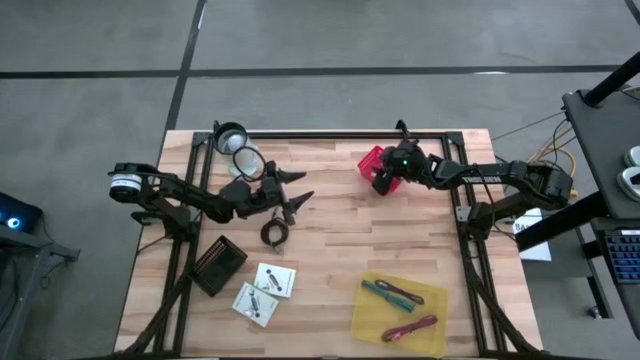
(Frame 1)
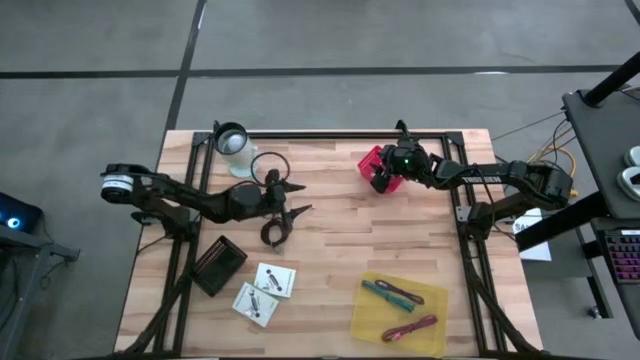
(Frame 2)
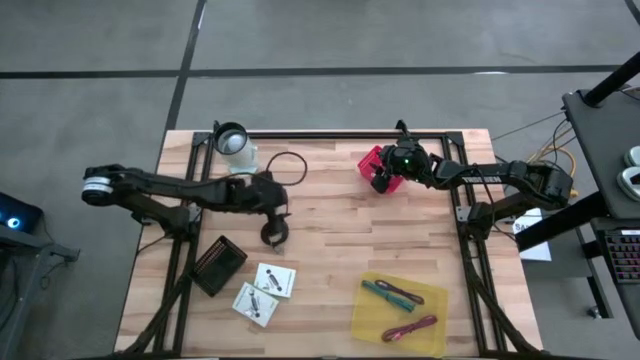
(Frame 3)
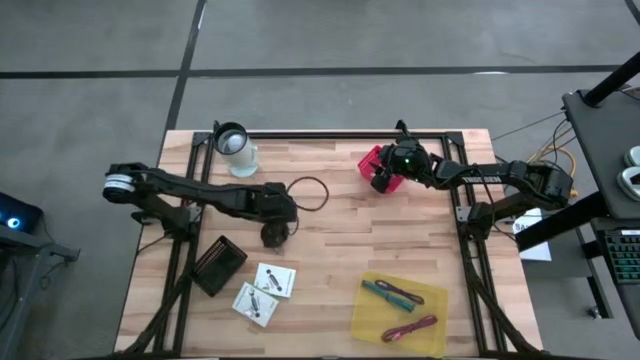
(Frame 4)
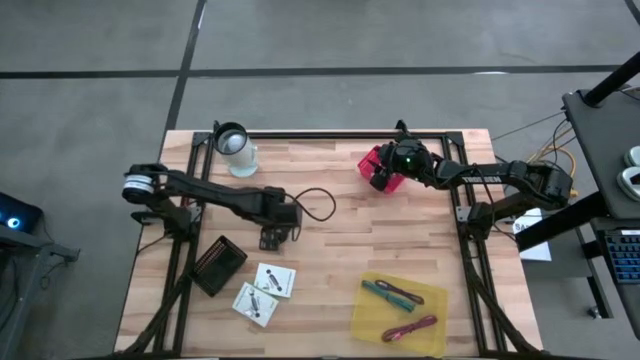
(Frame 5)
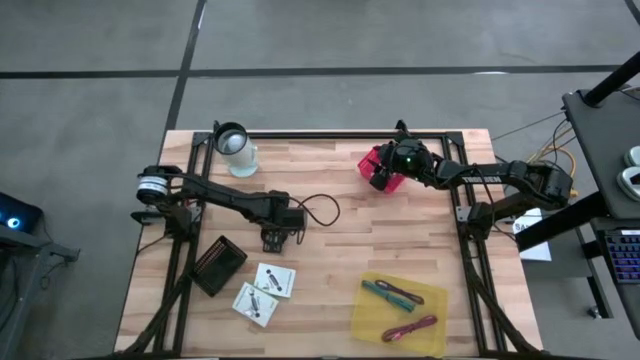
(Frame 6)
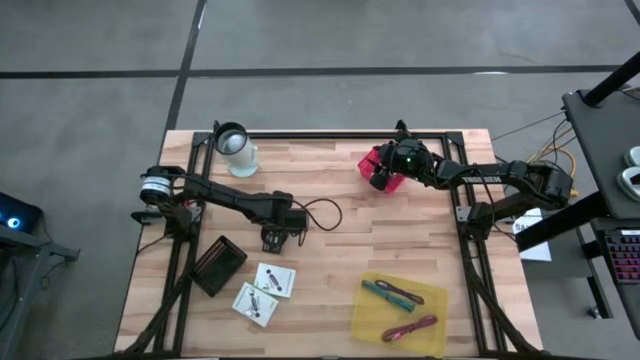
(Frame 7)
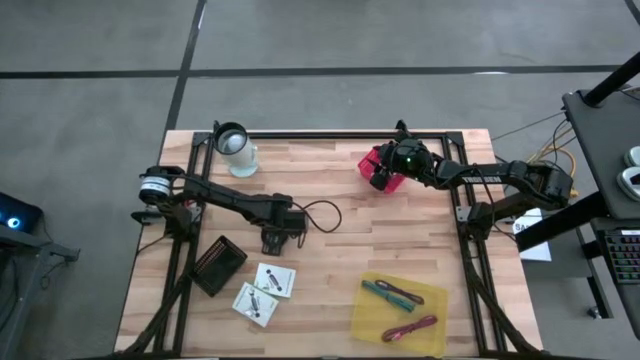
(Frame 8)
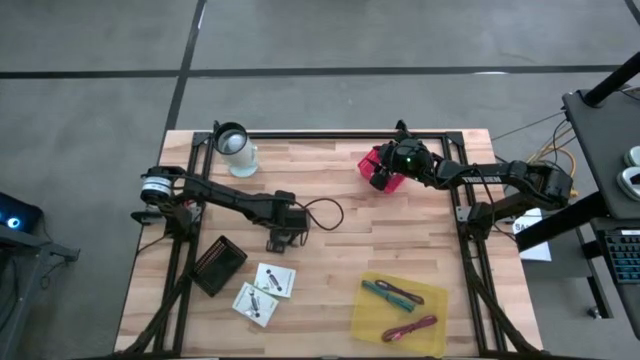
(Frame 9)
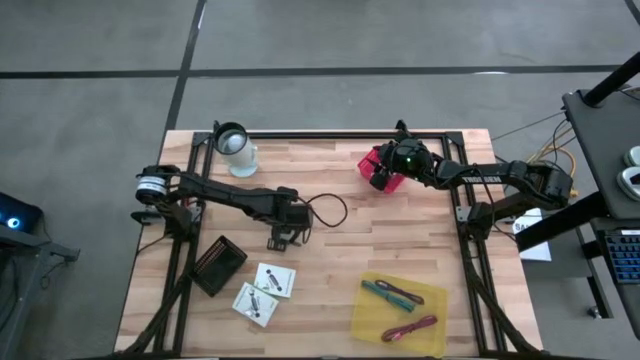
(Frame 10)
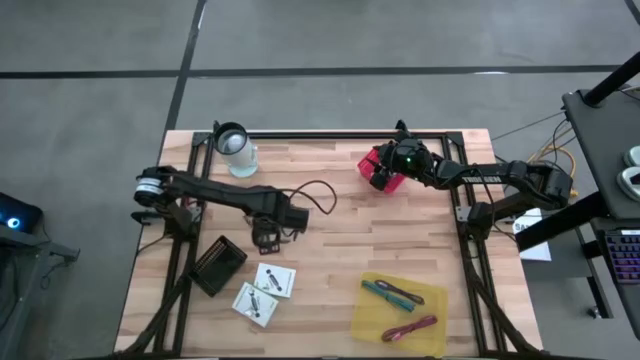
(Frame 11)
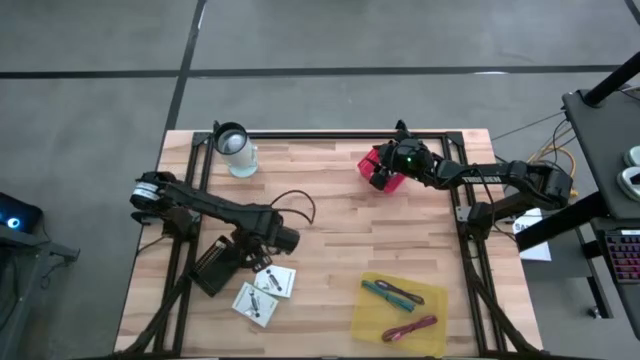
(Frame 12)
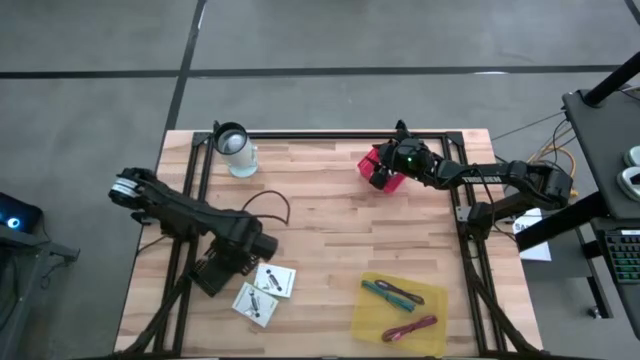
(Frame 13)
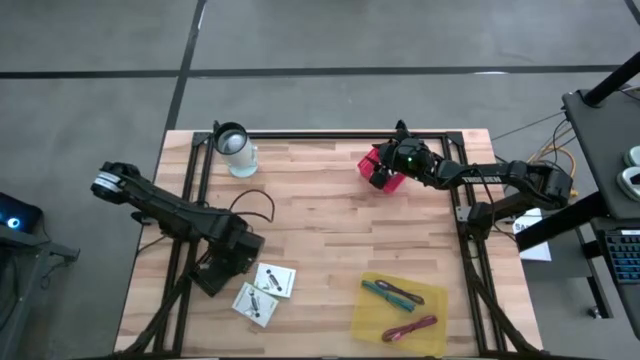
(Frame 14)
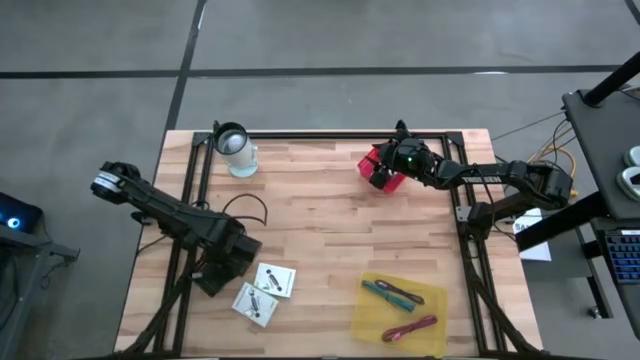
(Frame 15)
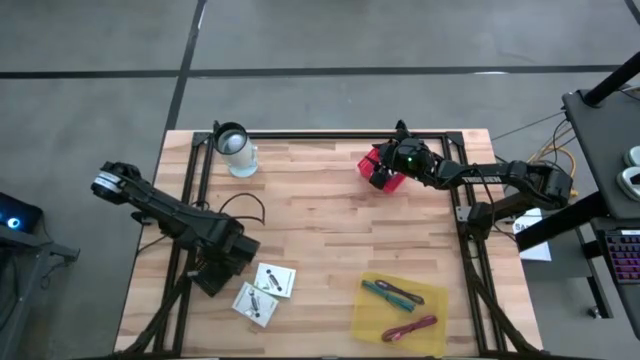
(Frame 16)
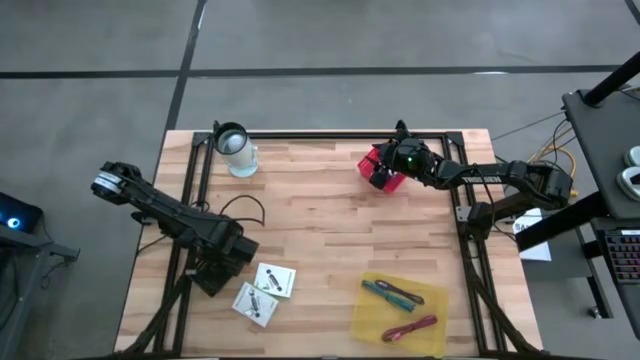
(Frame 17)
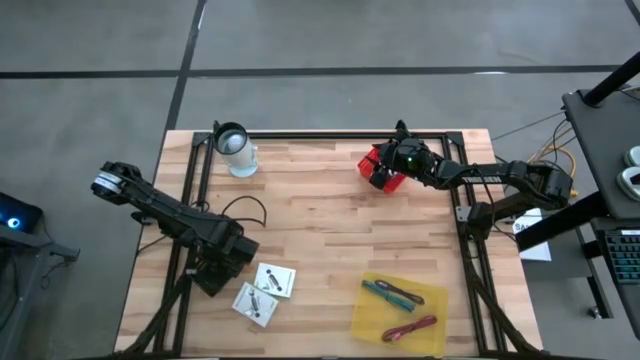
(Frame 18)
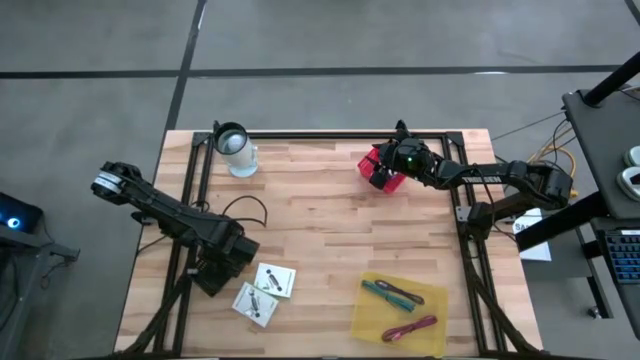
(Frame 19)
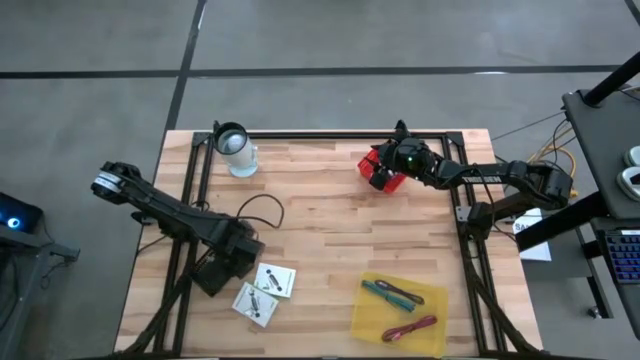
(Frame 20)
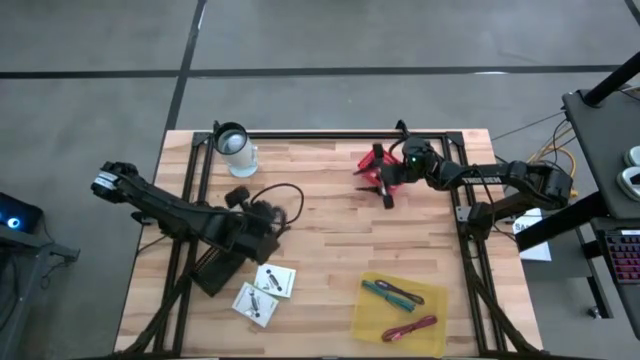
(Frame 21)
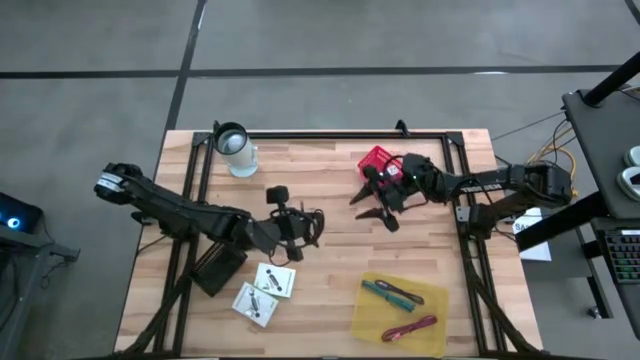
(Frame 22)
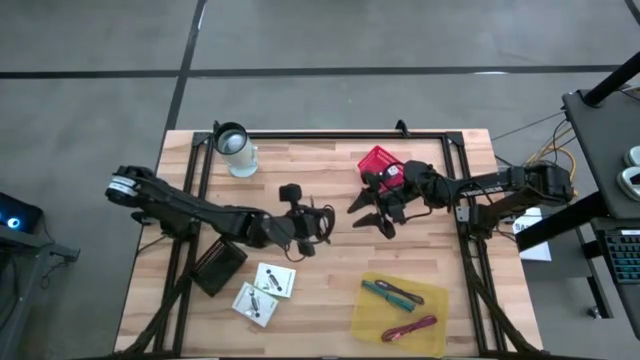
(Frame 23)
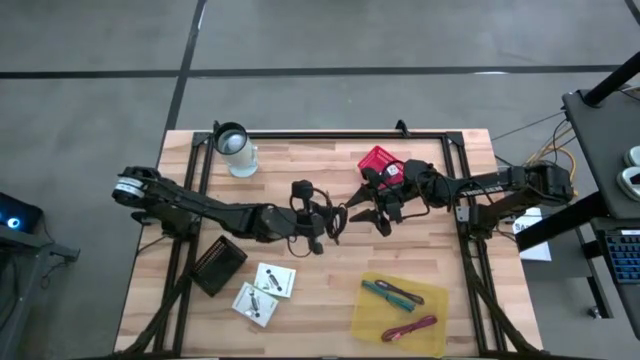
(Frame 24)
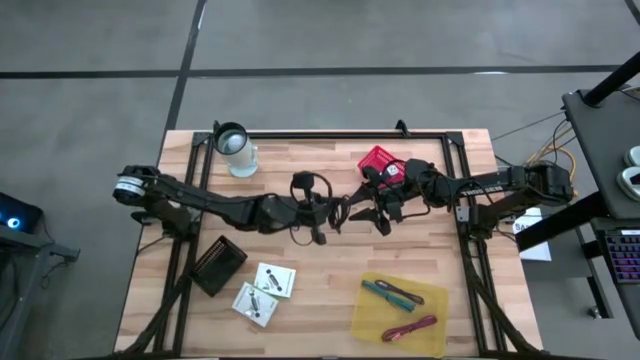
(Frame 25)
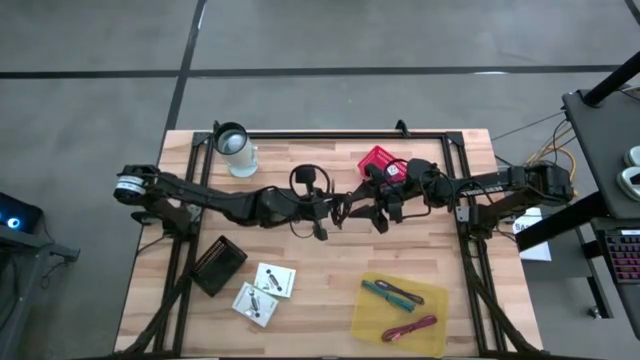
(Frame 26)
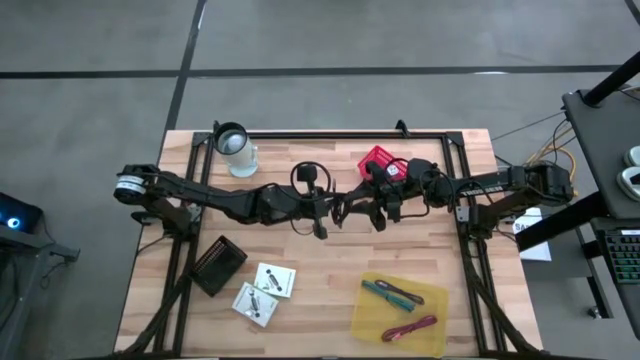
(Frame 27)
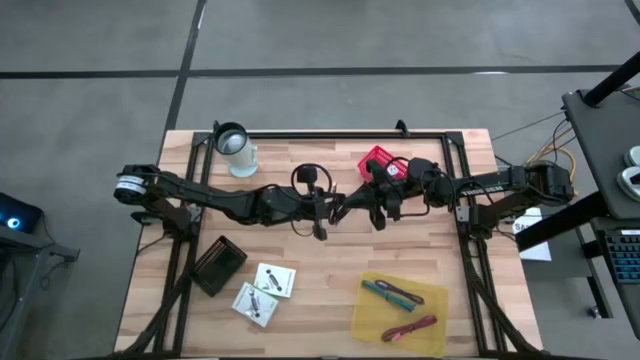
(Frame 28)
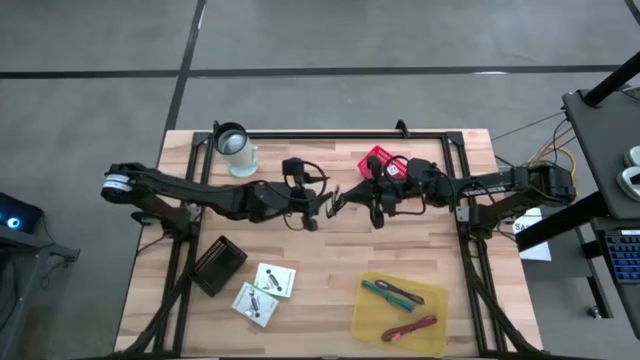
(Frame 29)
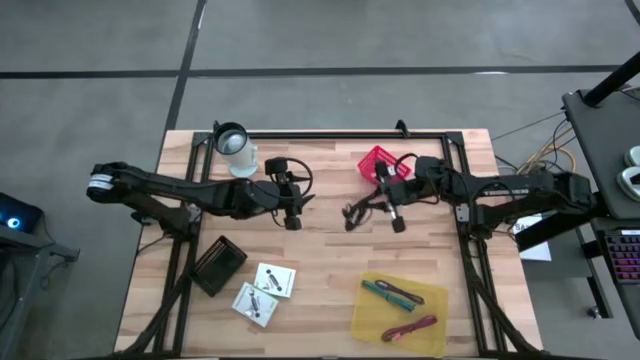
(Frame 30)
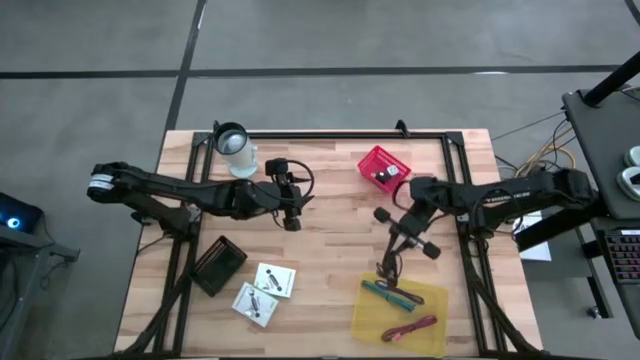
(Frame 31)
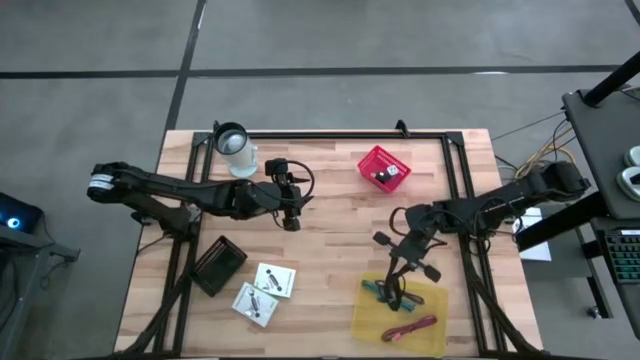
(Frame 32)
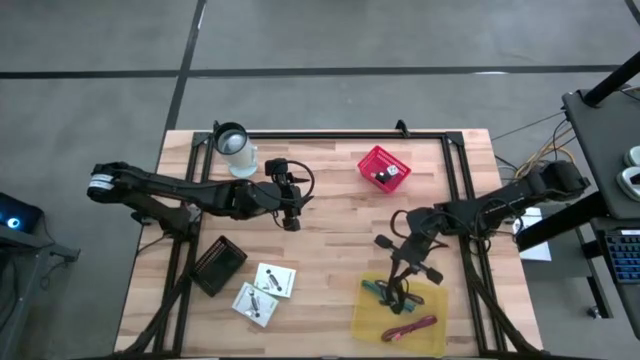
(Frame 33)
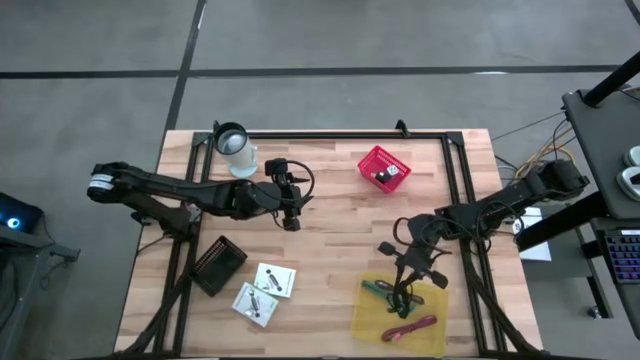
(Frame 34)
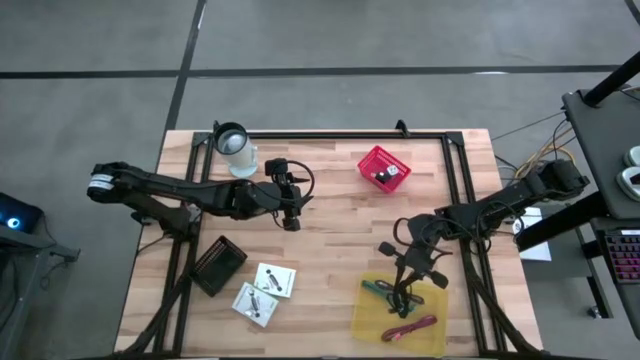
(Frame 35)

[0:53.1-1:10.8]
Task: Pick and place items into bin
Put the black charger cable into the yellow bin

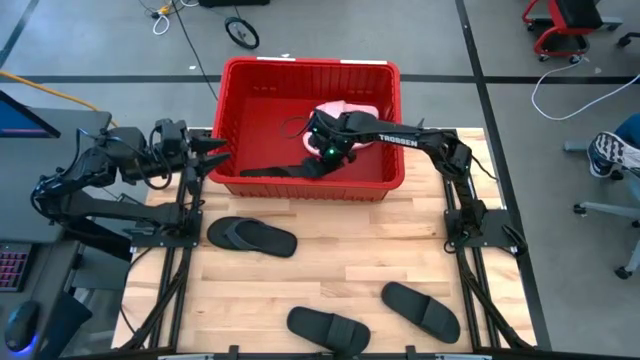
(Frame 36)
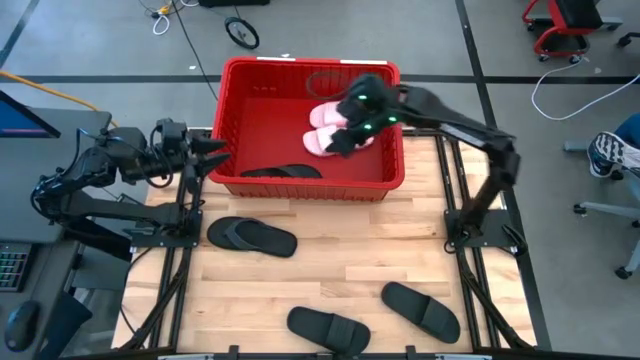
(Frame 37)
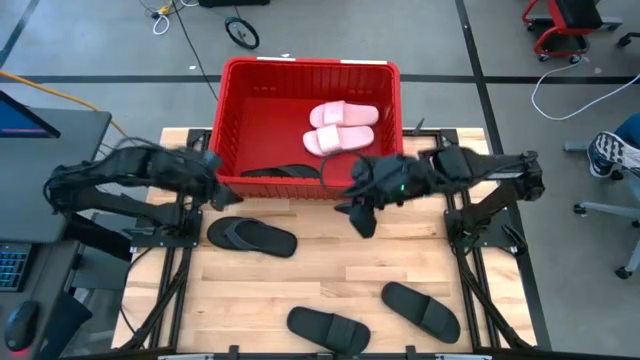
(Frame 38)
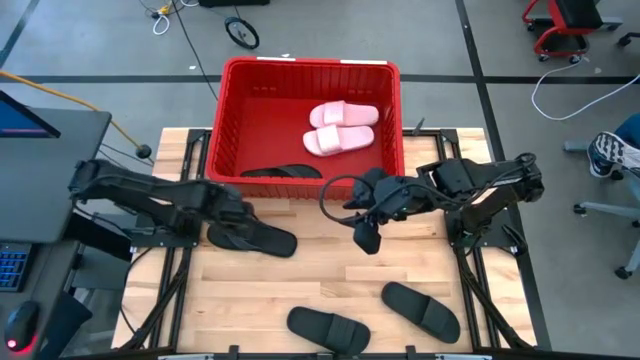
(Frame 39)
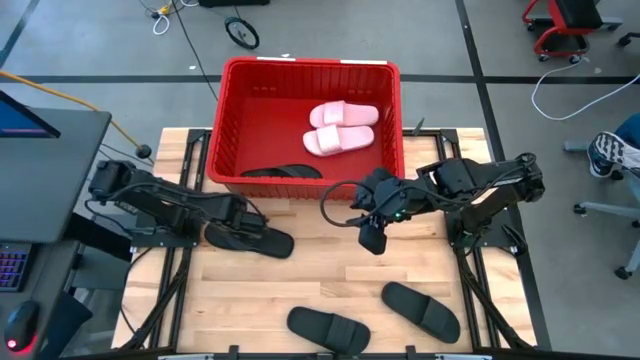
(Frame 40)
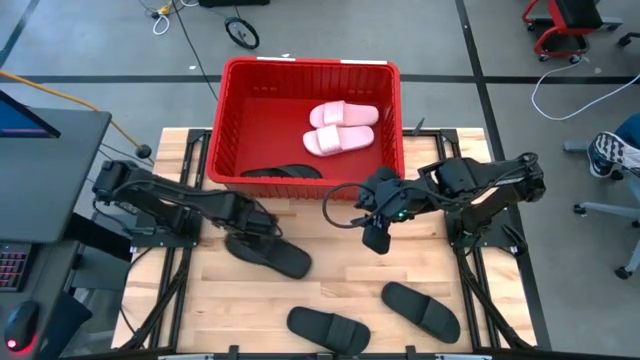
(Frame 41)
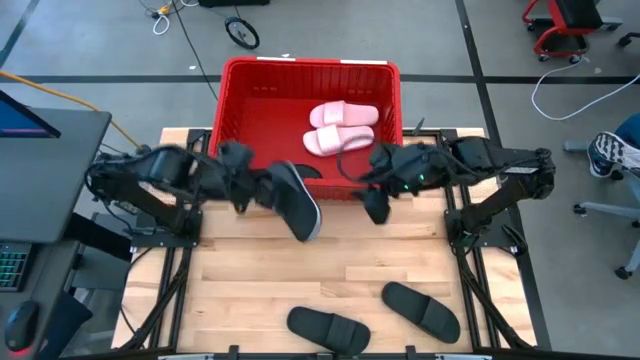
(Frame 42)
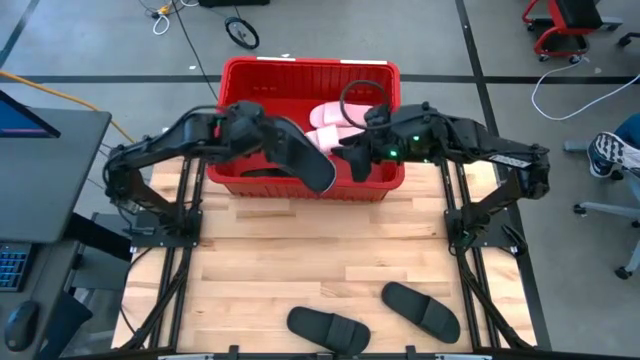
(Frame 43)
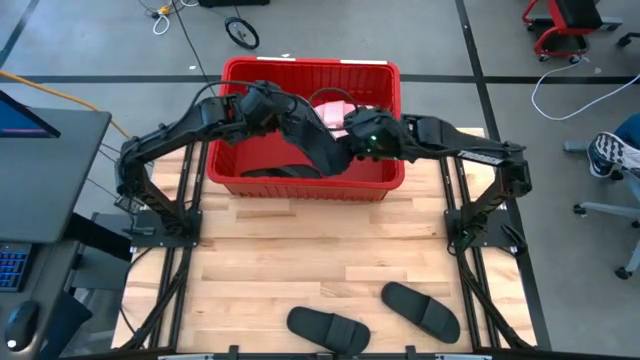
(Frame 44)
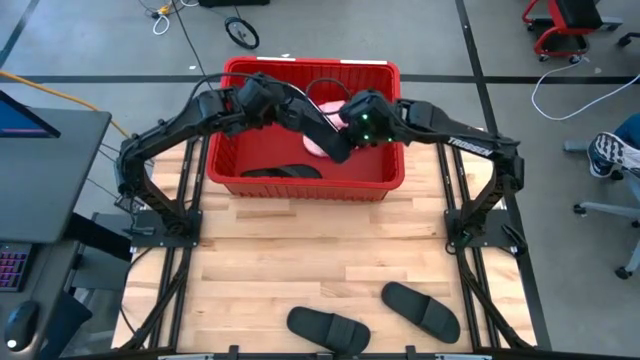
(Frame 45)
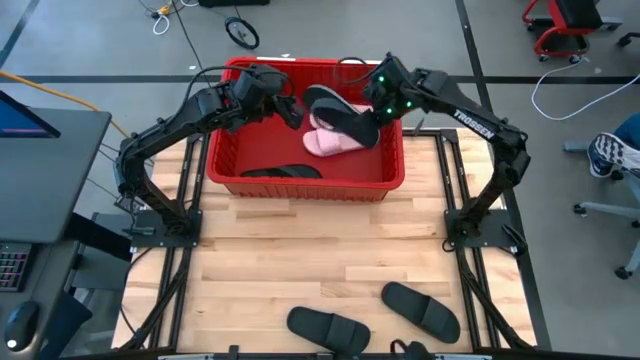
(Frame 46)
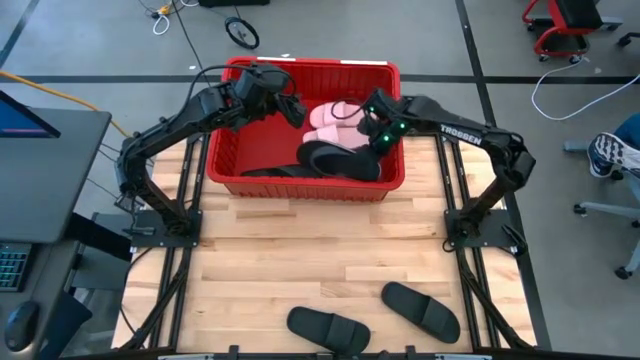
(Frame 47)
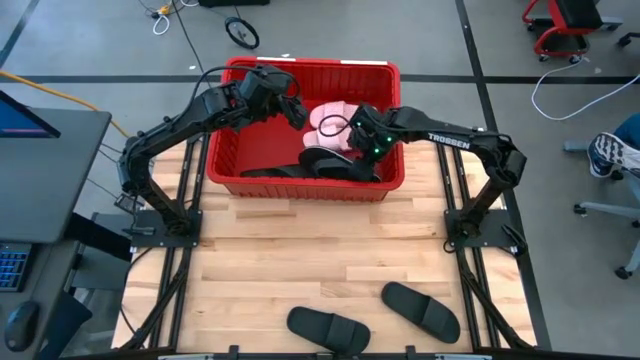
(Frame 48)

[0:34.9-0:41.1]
Task: Pick and place slides into bin
Put the black slide into the red bin
